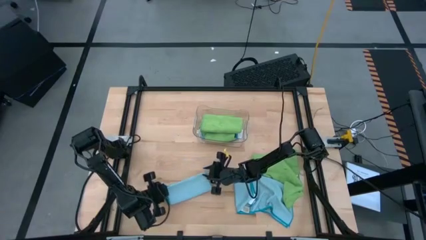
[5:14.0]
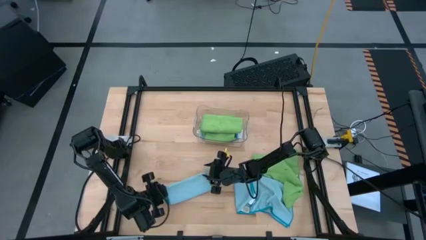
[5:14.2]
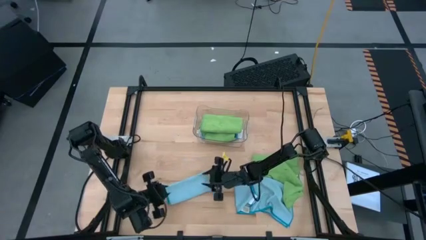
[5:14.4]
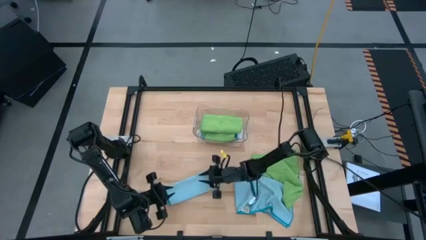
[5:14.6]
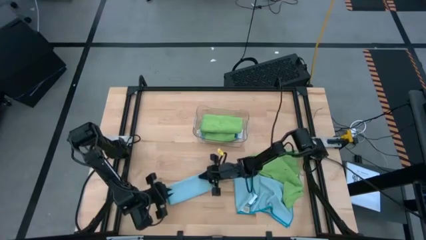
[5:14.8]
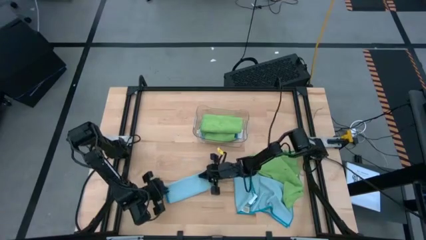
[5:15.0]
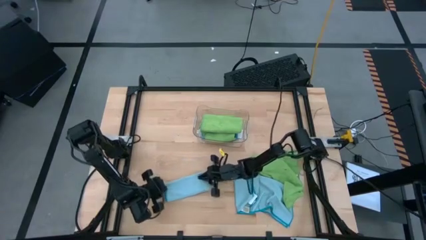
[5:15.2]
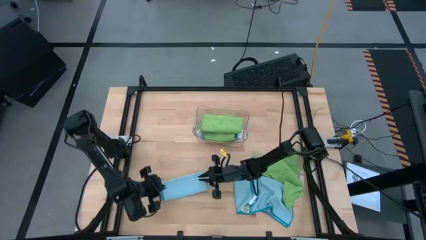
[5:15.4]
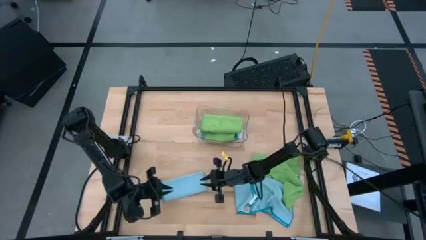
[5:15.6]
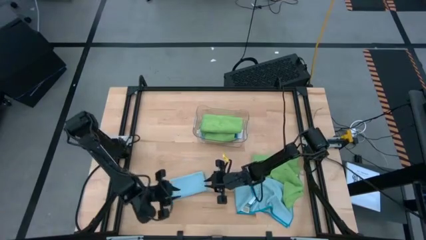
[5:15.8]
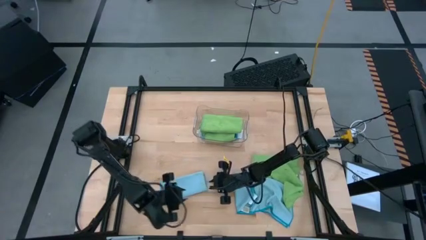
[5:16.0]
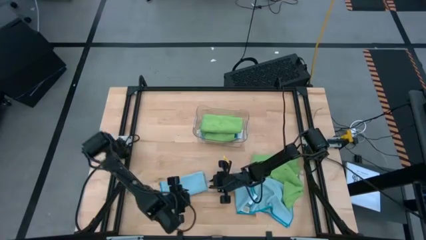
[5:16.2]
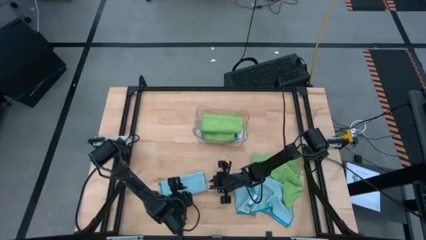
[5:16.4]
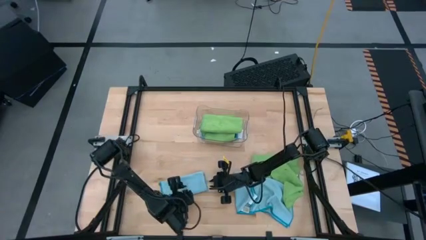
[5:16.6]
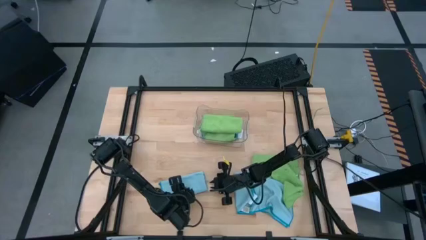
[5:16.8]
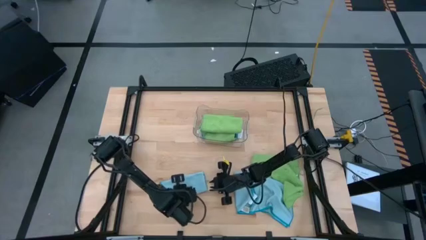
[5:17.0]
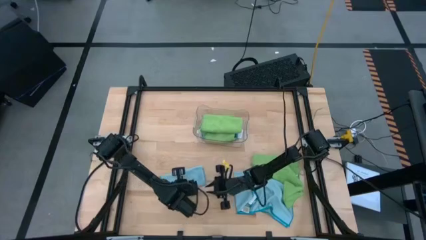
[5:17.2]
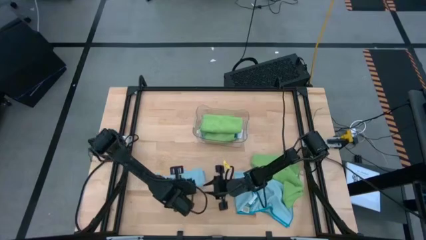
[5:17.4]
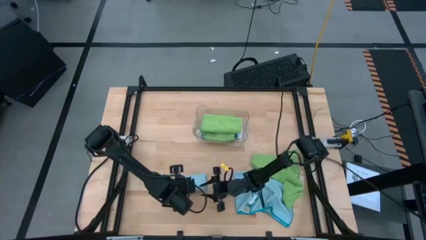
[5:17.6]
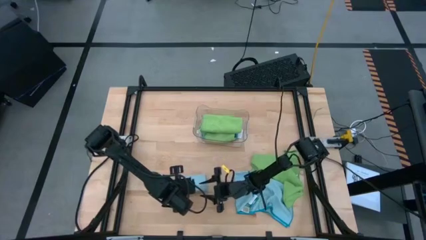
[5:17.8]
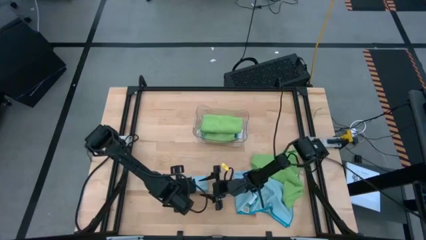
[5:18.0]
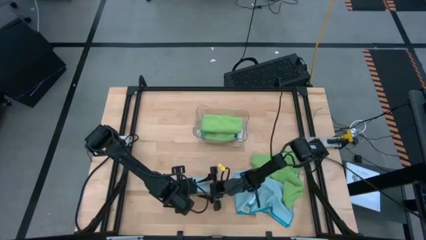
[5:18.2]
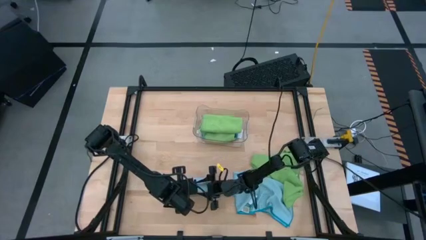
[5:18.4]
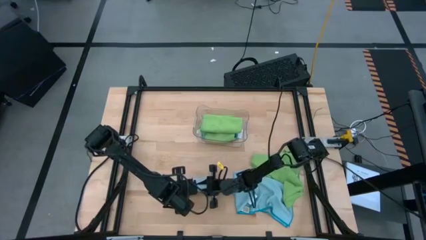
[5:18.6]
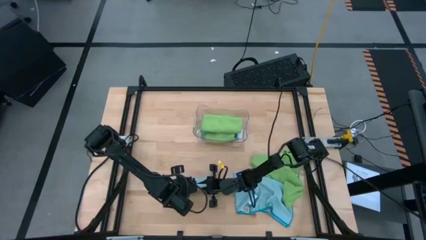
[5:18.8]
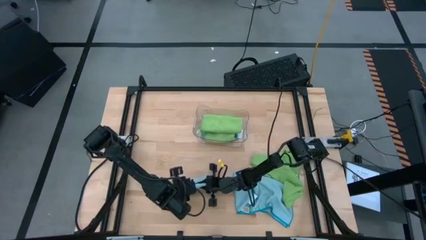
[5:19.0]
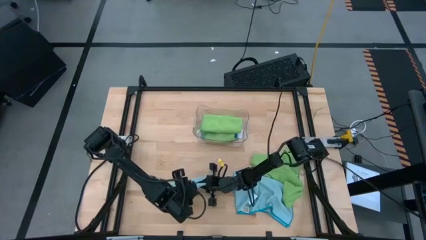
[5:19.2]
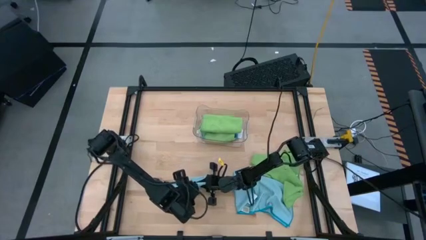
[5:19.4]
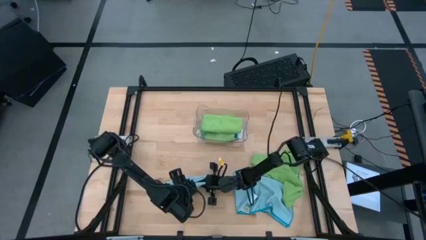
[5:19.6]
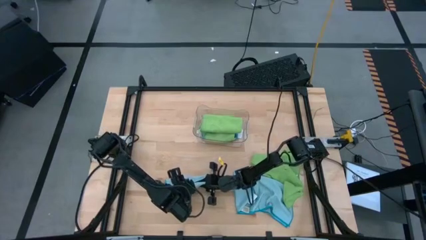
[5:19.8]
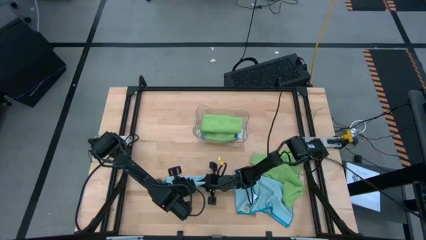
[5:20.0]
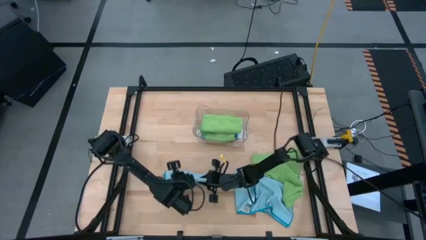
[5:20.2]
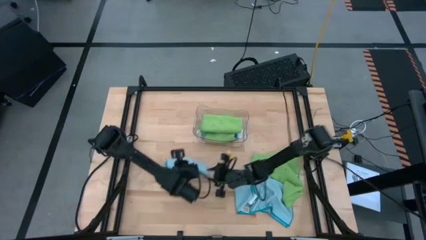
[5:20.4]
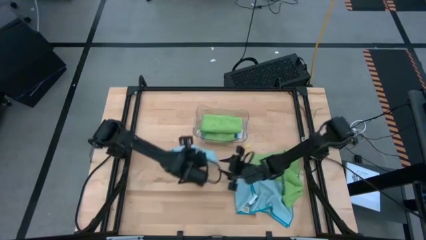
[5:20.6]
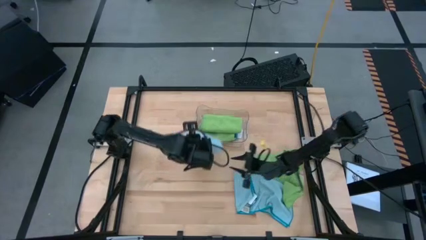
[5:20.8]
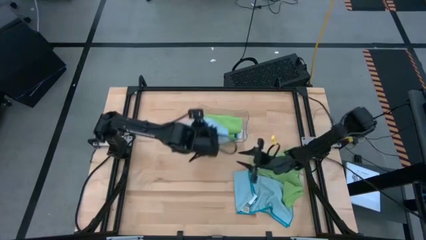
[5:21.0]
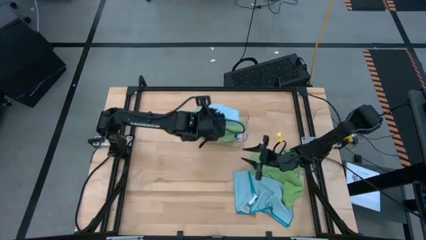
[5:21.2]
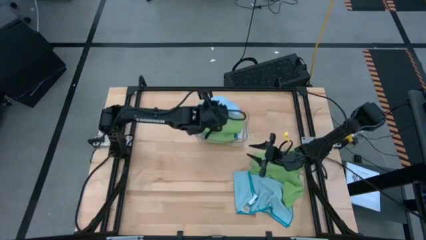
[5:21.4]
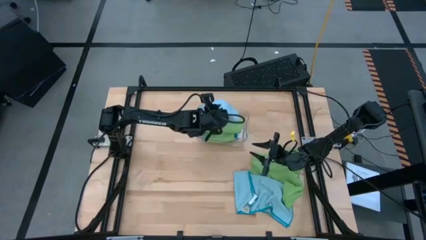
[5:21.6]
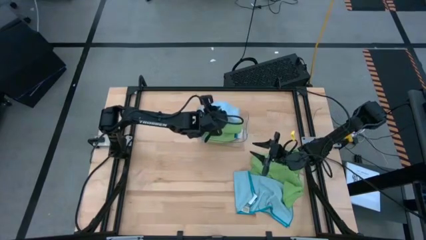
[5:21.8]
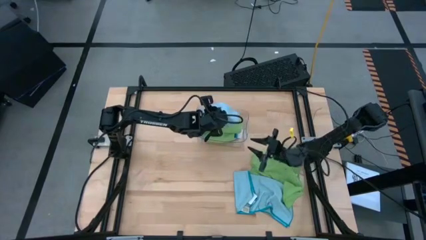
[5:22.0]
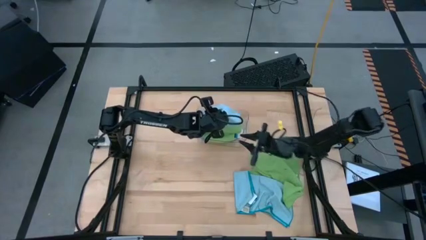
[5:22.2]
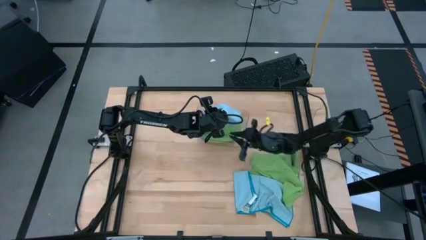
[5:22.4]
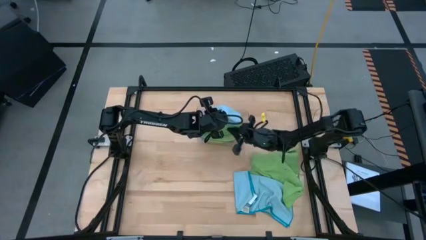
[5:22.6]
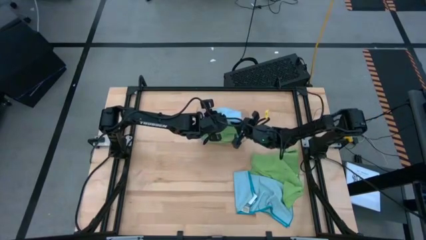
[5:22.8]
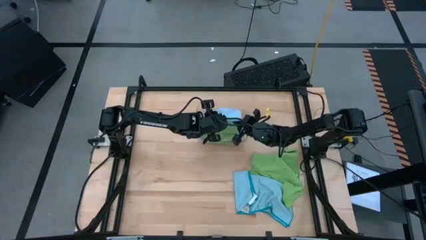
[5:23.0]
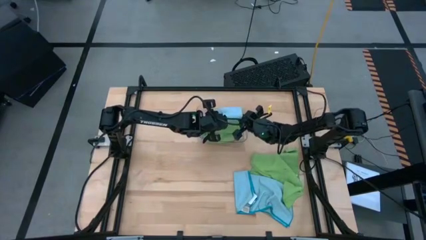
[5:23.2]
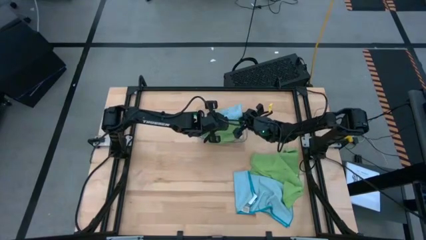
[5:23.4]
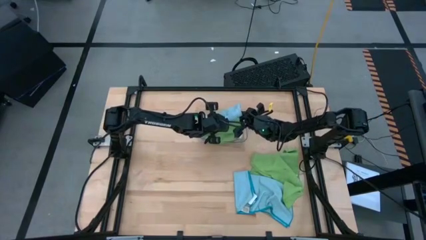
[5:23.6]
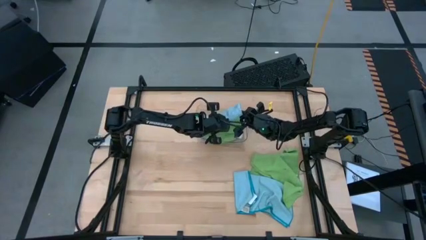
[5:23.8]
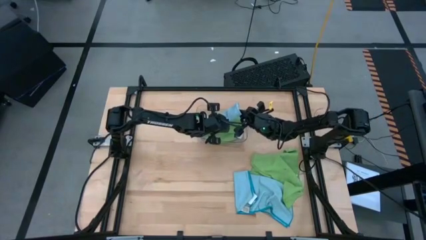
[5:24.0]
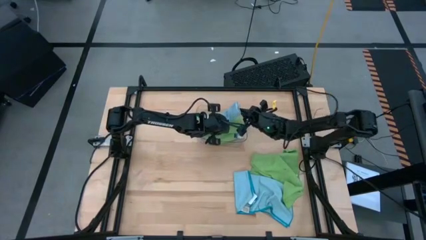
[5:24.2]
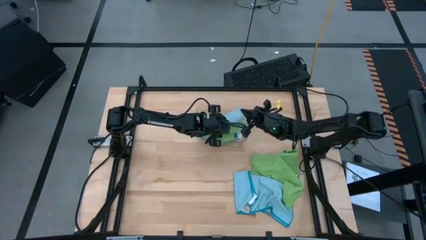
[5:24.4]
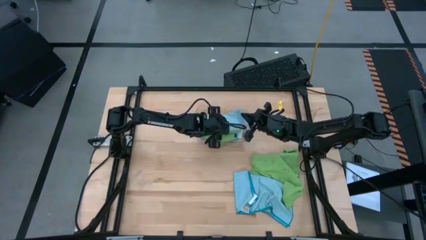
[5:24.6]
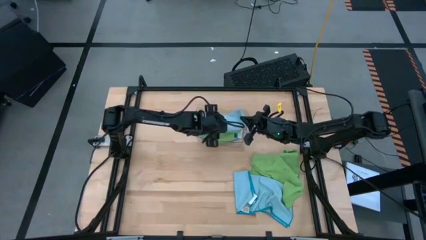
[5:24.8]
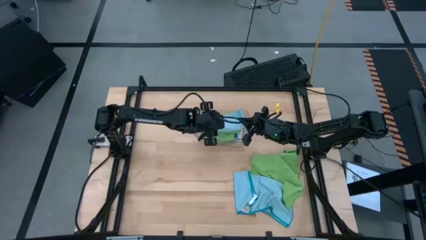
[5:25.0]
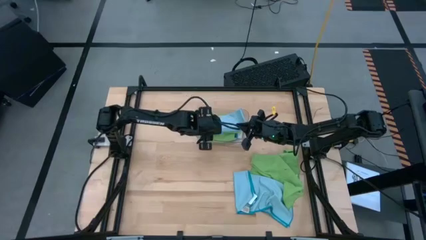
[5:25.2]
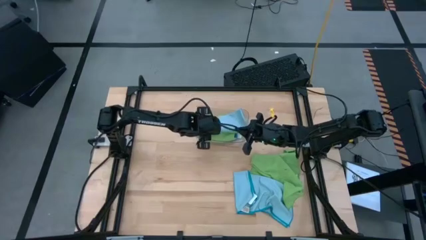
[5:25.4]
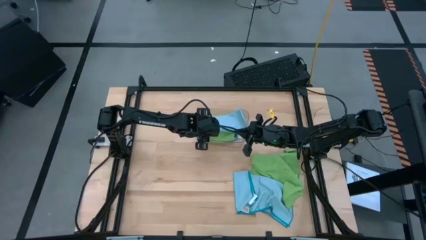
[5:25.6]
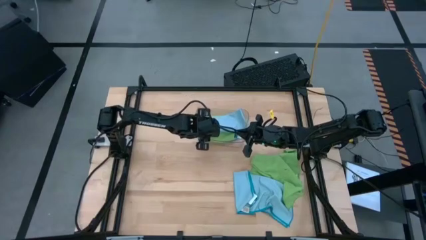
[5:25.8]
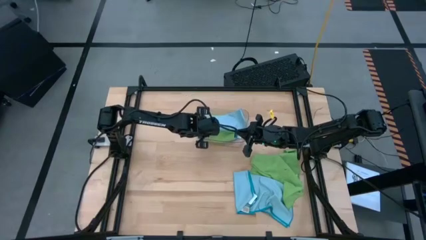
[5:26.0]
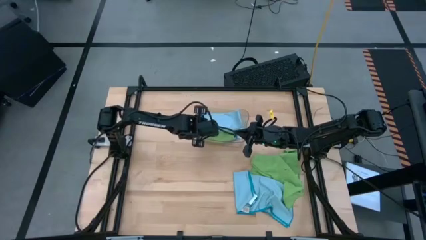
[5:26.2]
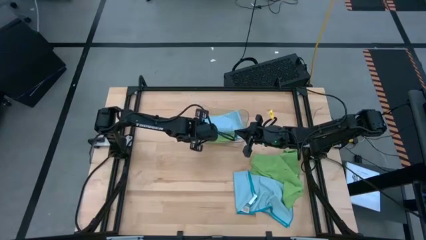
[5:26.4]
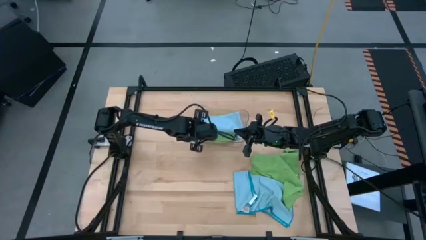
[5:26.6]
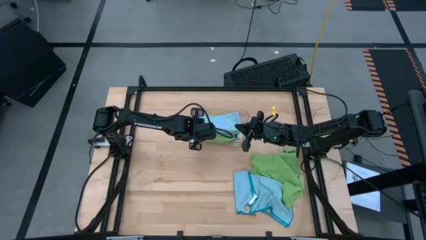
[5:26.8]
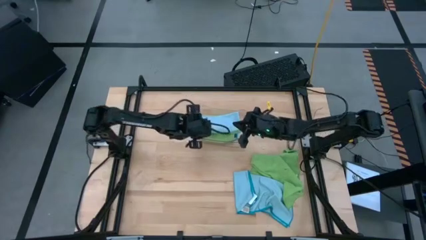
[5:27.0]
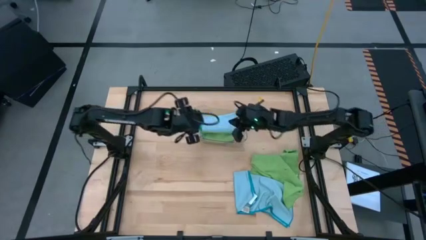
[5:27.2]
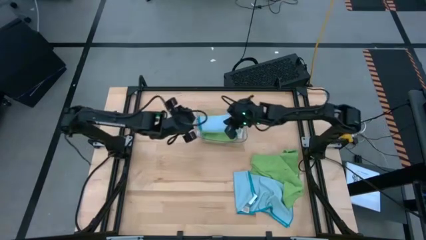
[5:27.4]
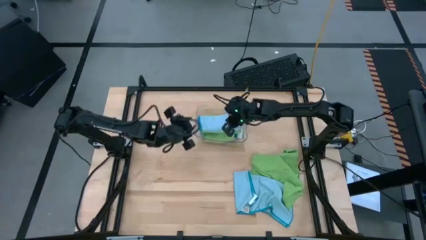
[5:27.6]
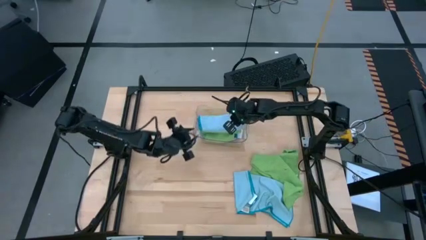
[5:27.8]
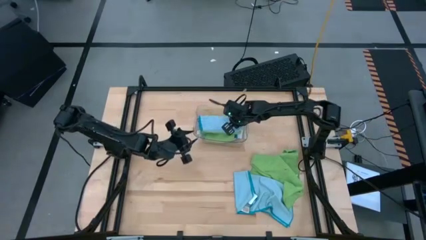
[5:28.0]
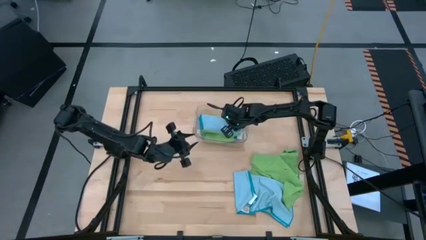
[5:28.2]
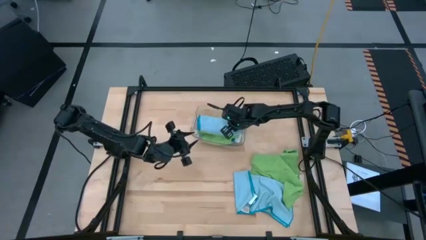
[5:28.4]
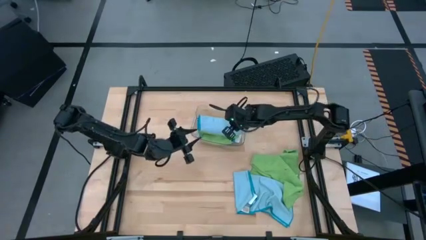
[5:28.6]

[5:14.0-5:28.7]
Task: Fold microfiber towels
Stack the folded left blue microfiber cloth on top of the green microfiber cloth in the transparent bin
